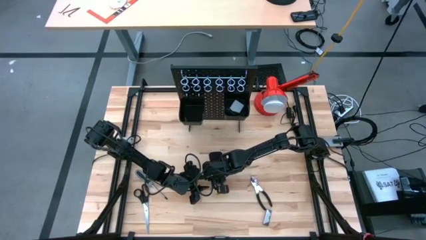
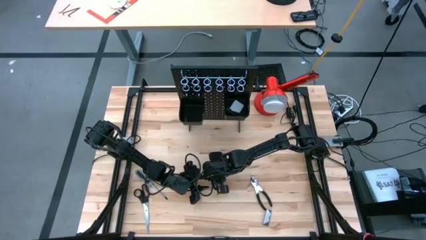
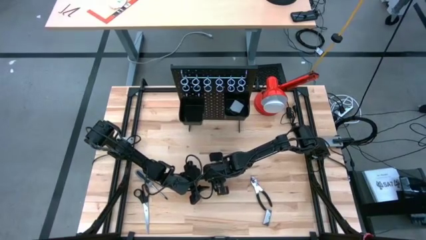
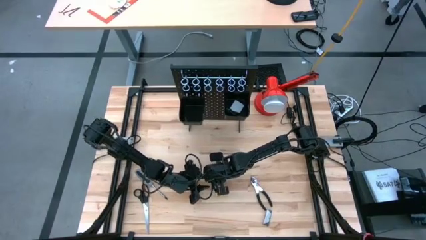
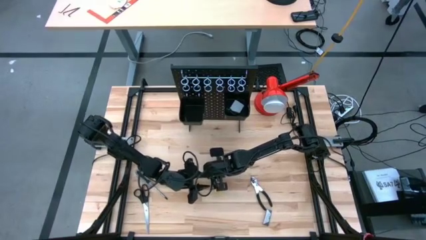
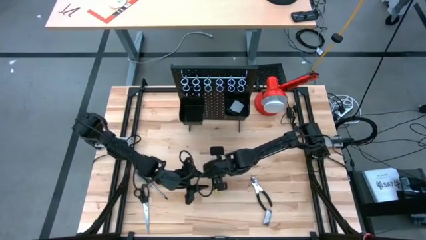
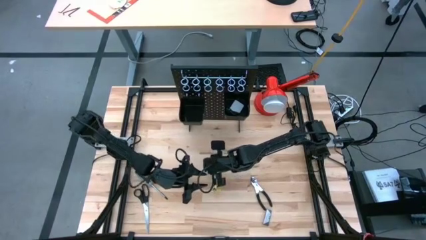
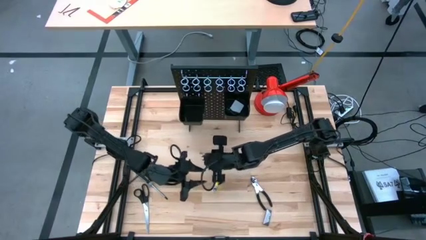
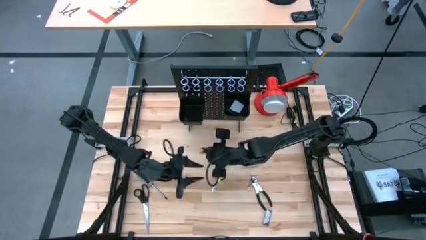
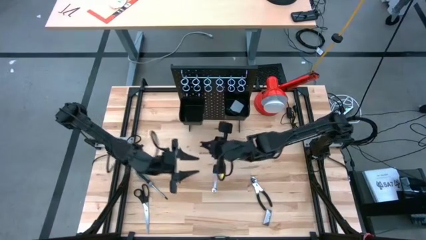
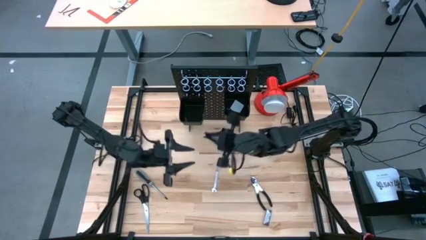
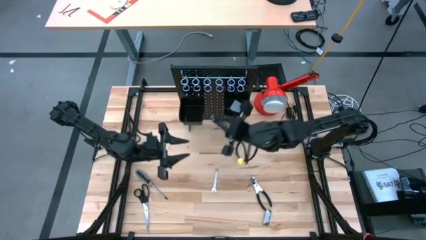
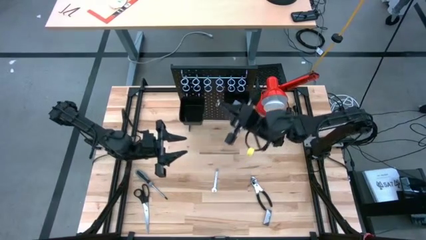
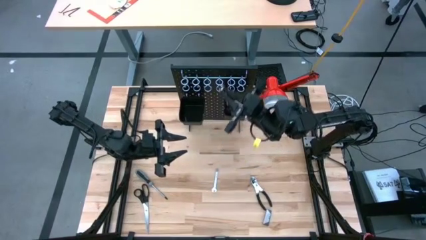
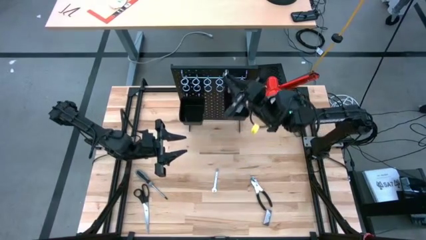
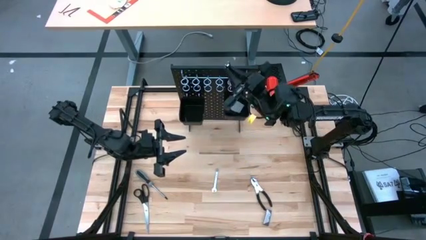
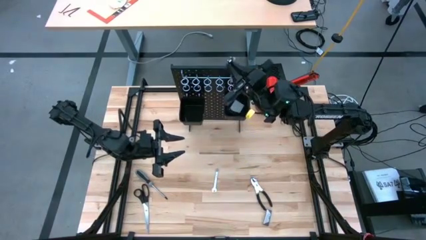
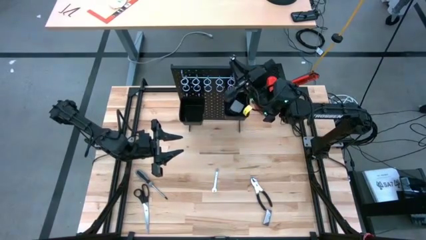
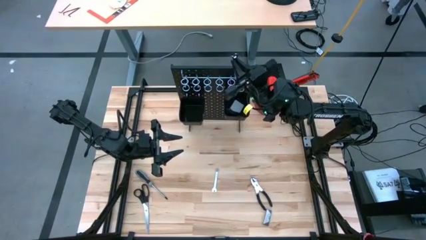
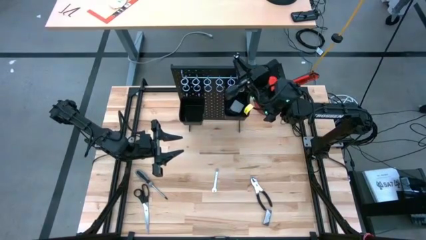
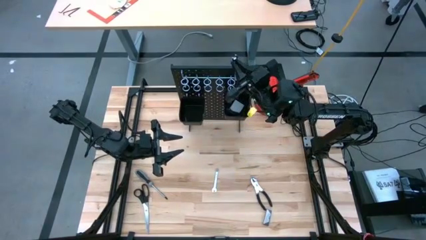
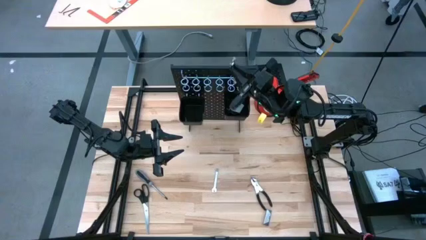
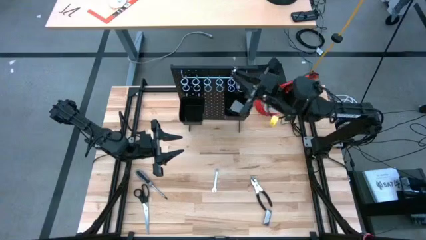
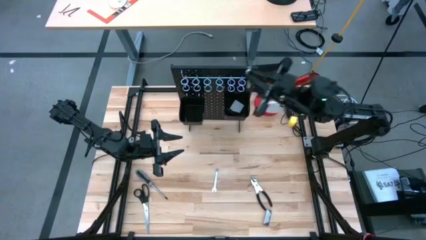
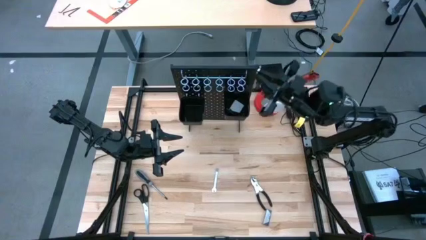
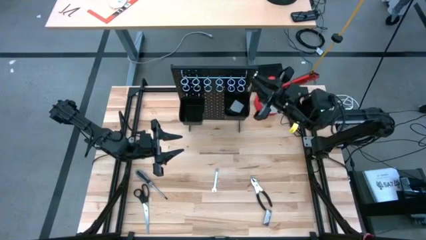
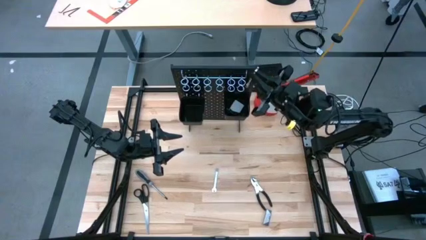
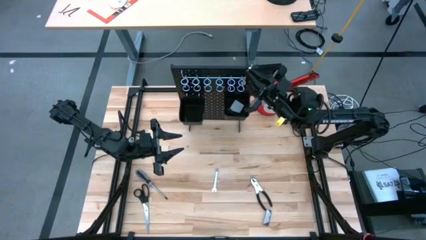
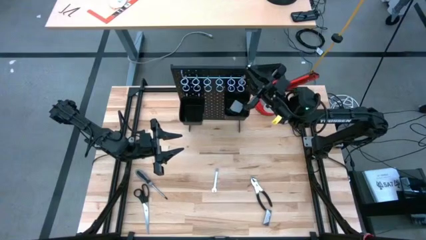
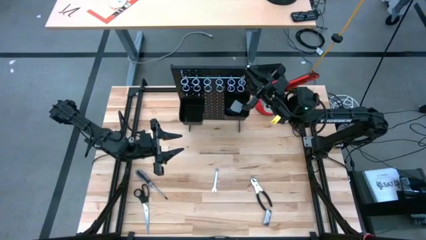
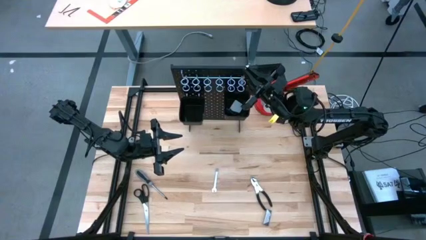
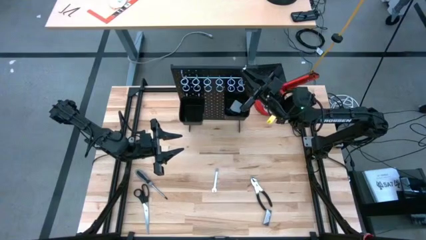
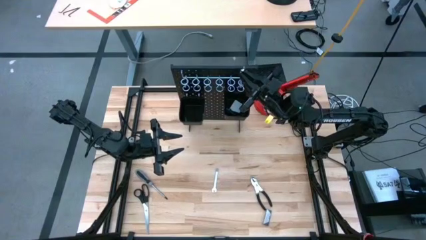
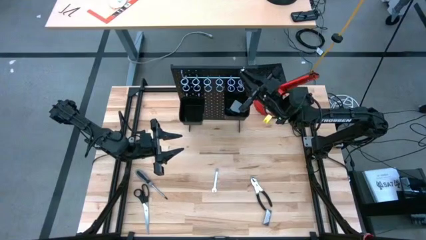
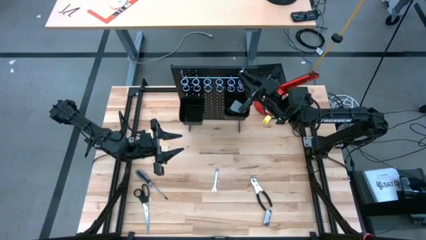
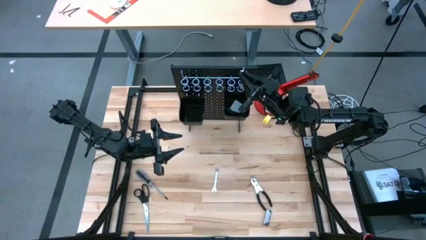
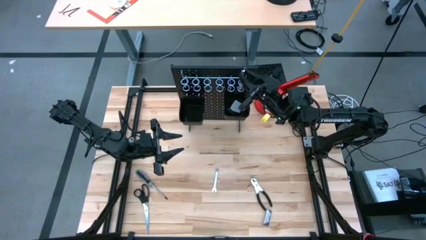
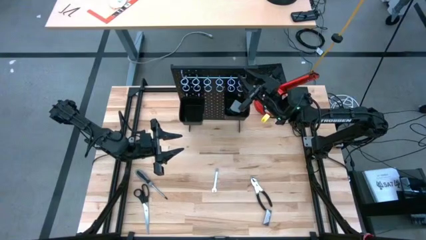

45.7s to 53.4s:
Task: Hang tools onto peg board
Hang the bottom wrench on the pegboard

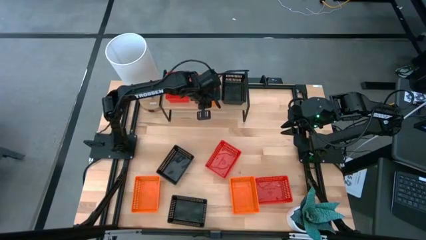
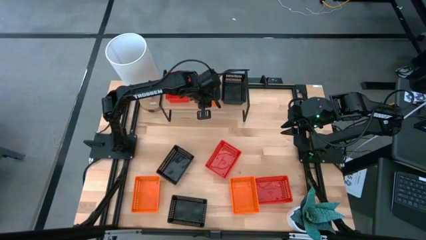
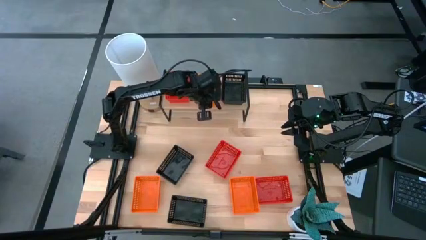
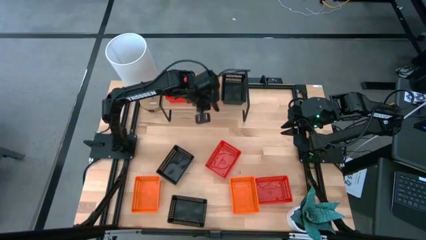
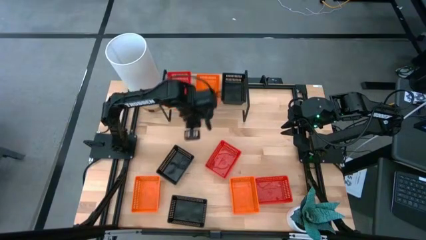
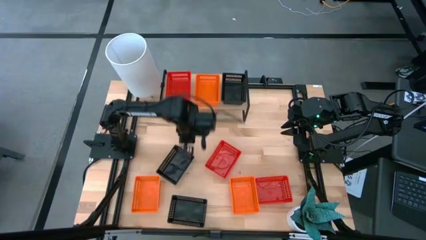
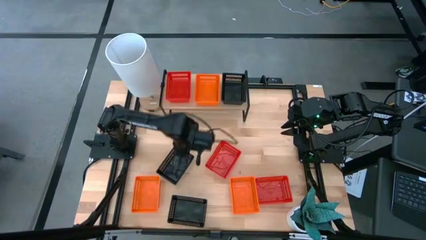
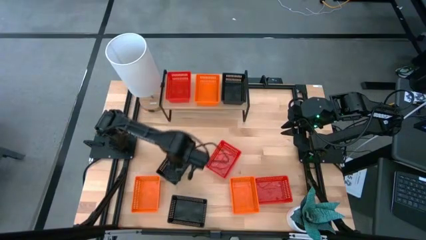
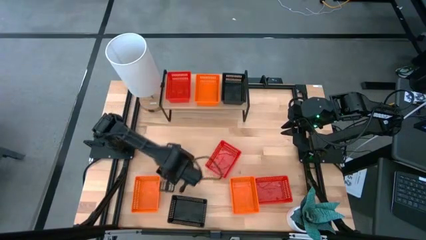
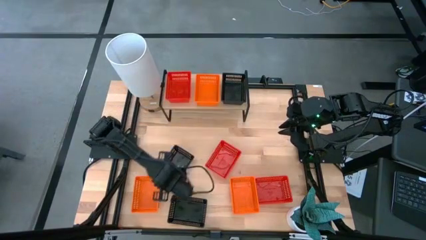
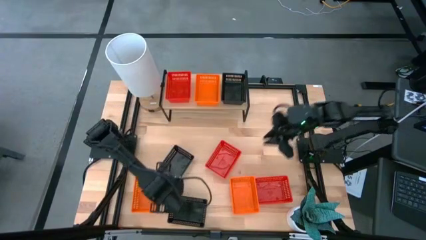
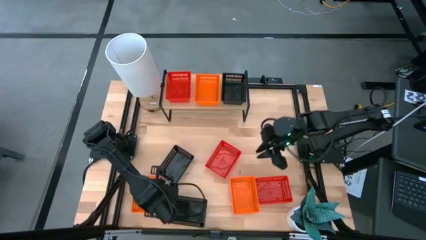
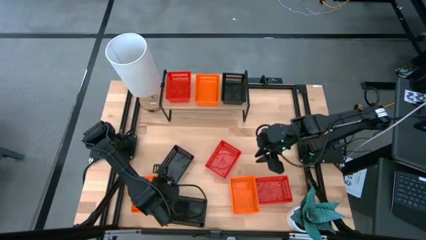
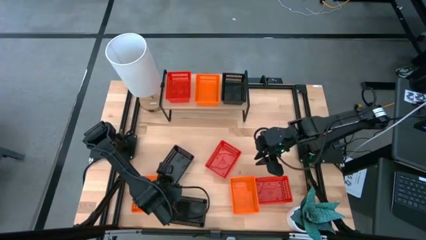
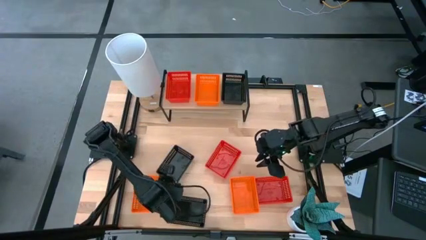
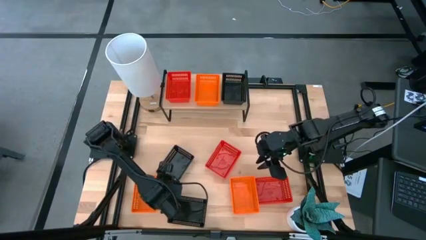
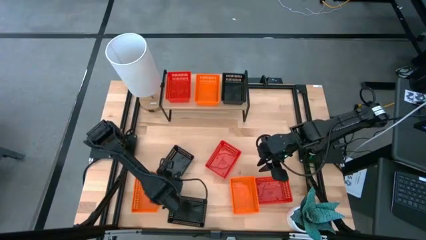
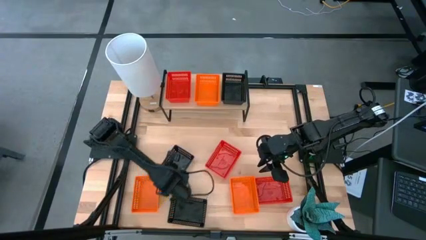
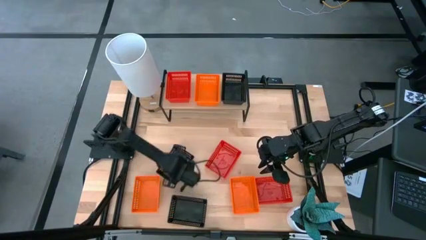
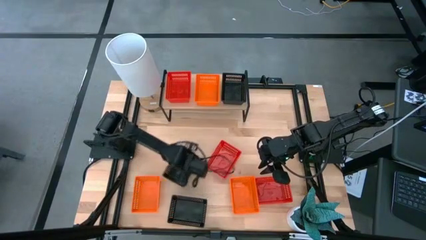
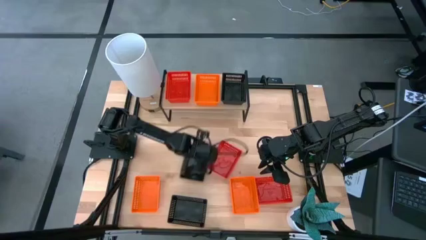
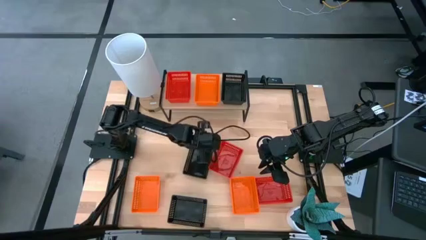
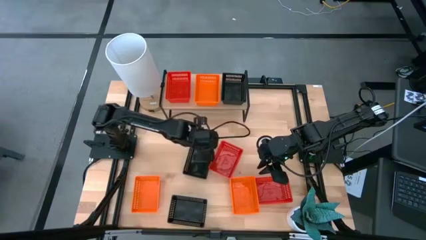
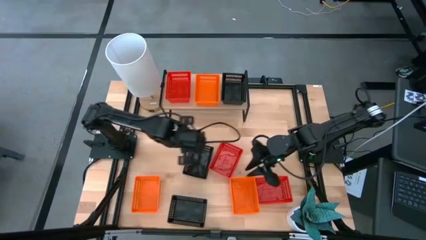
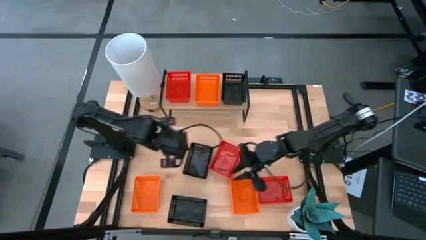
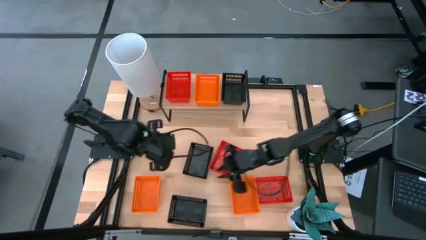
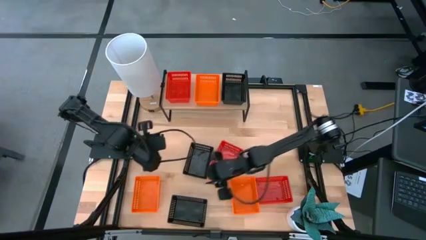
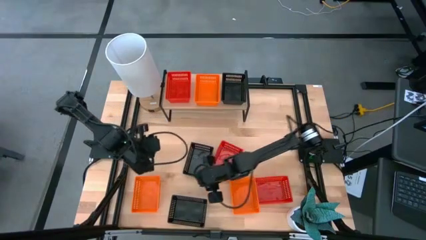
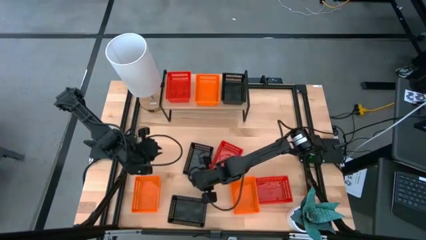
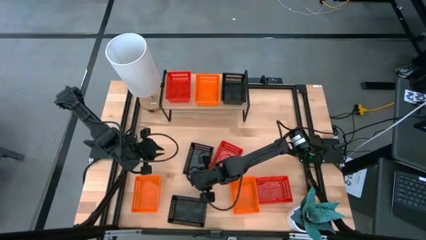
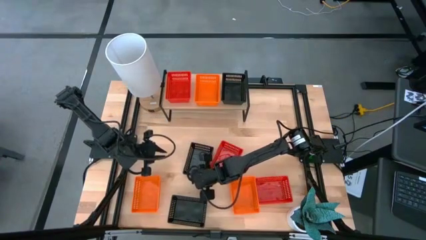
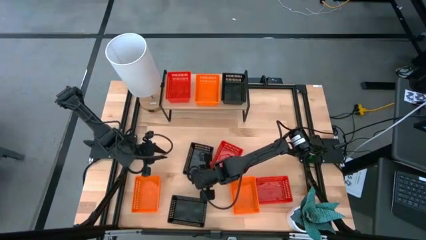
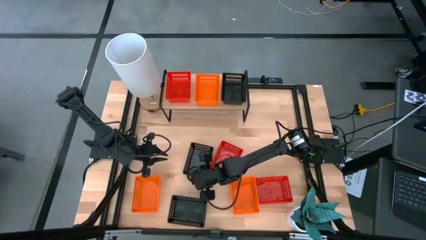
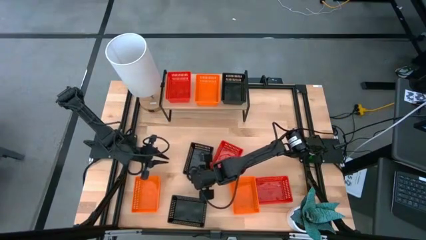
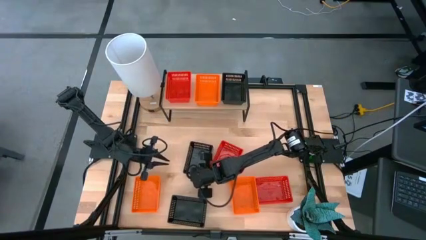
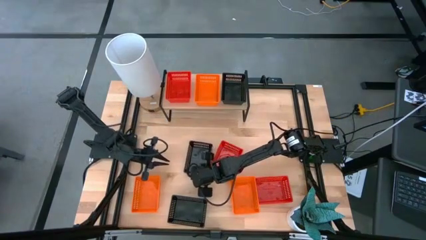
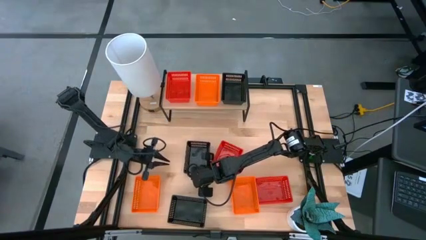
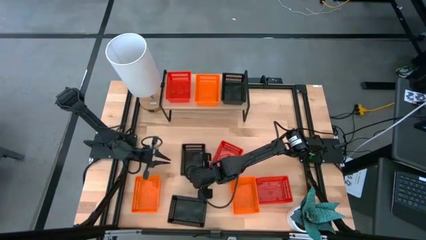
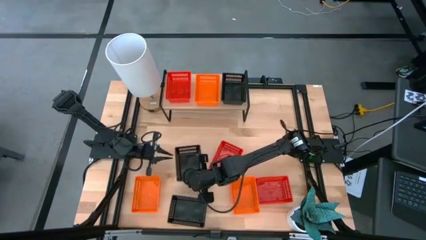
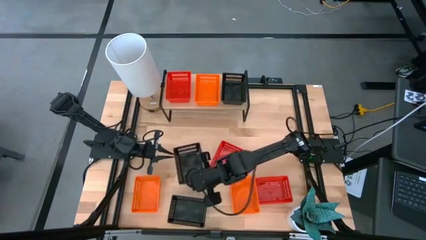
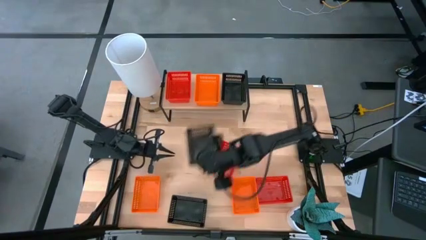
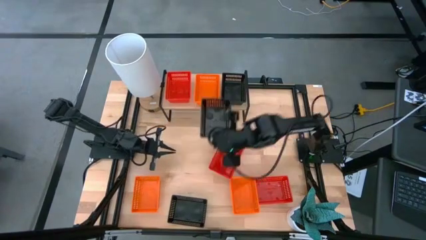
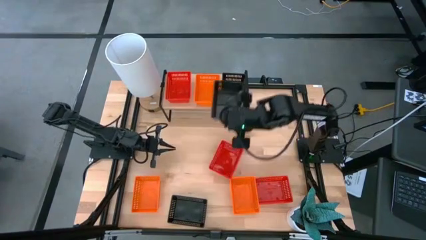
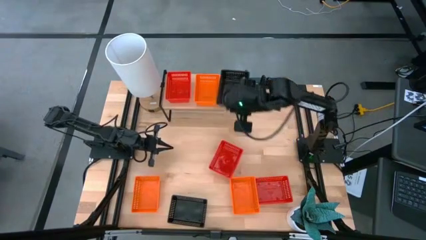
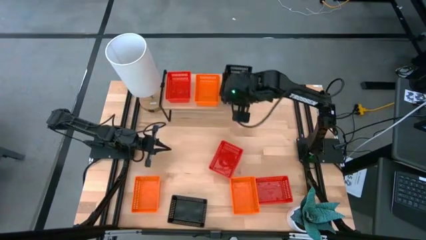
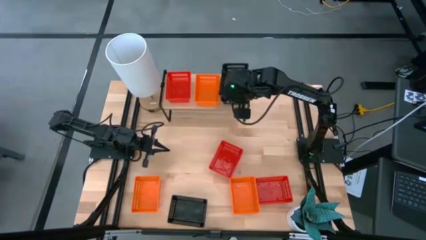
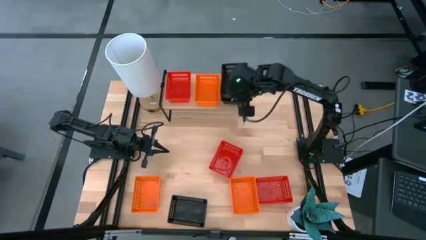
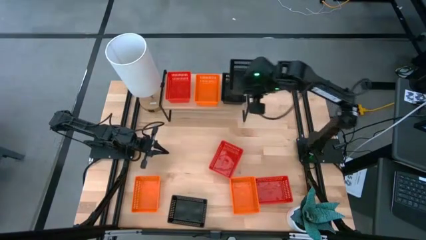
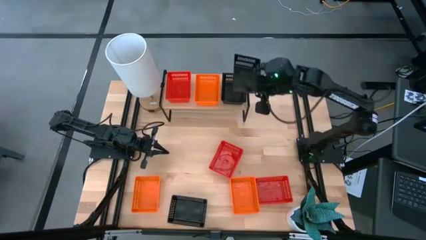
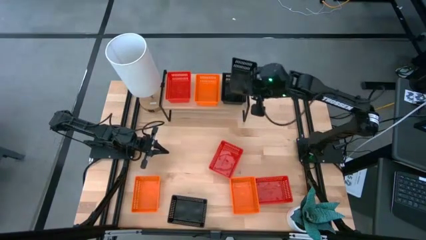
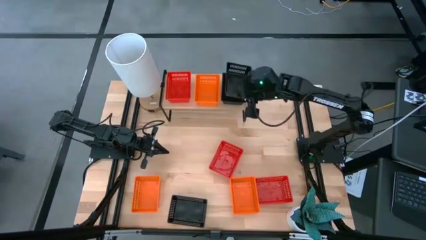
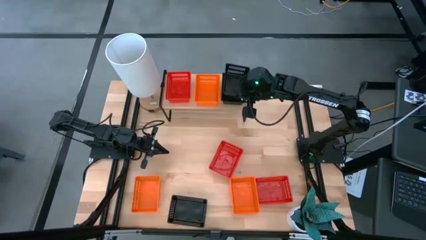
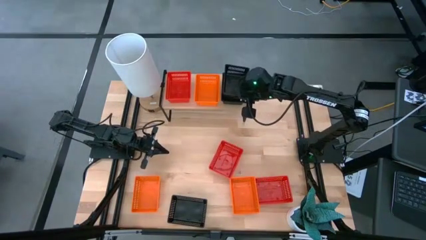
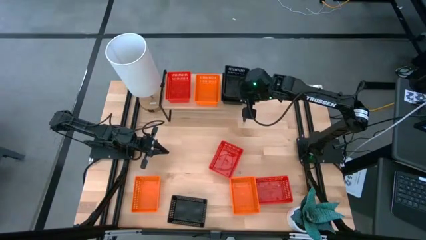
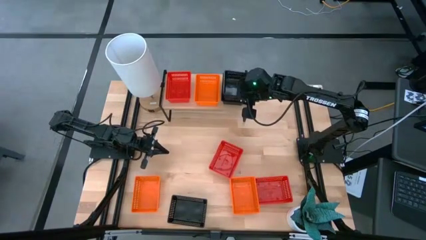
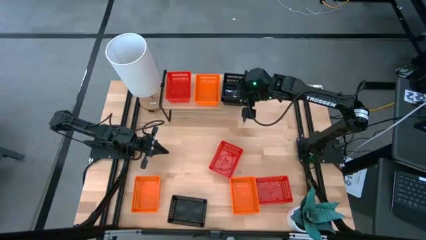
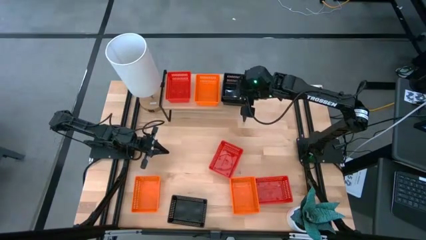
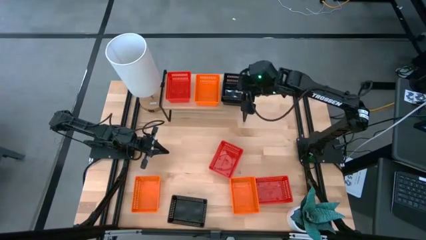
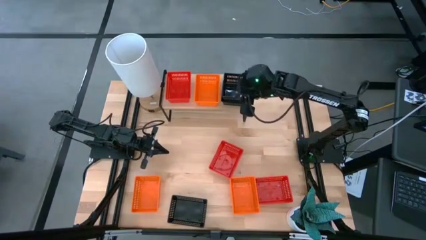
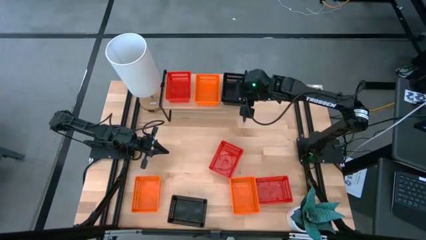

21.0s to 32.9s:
Task: Stack baskets on shelf by color
Stack the top black bin on the black bin on the shelf
